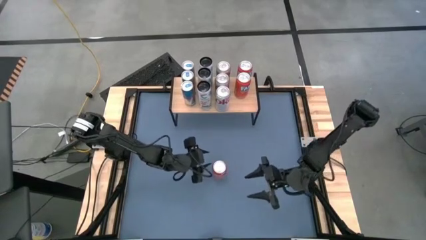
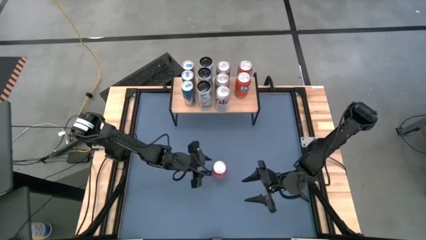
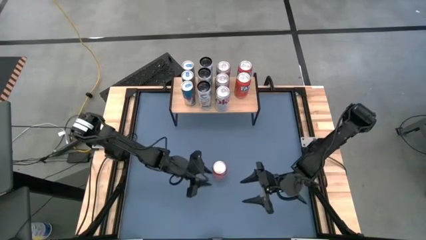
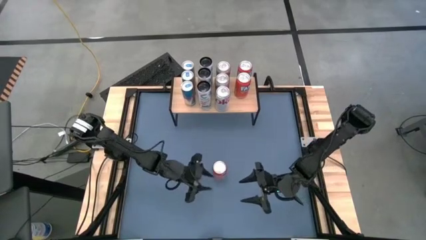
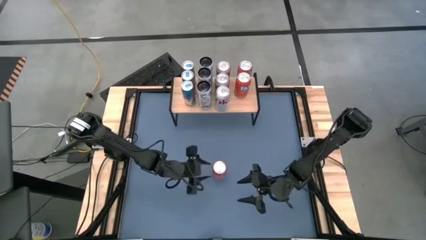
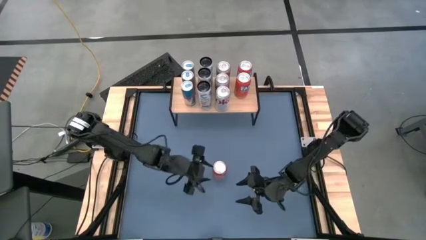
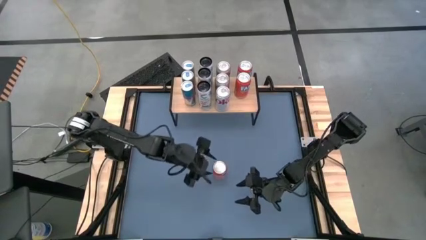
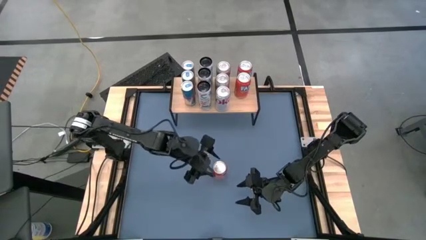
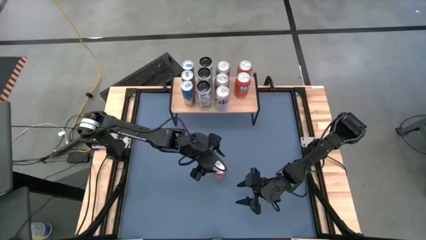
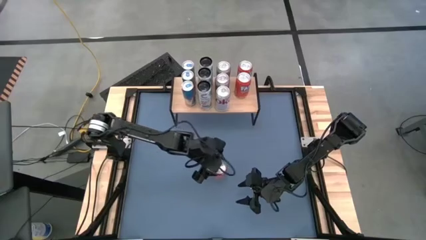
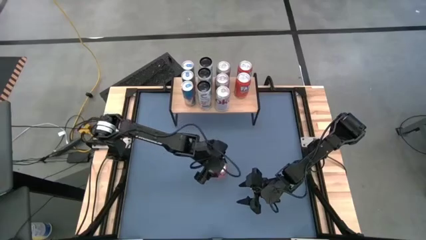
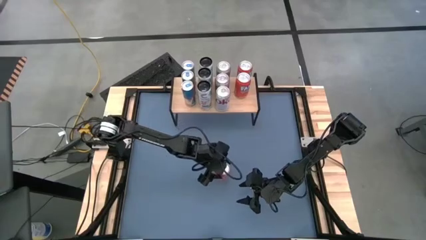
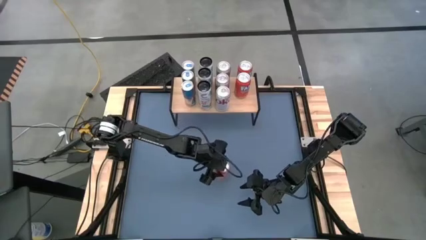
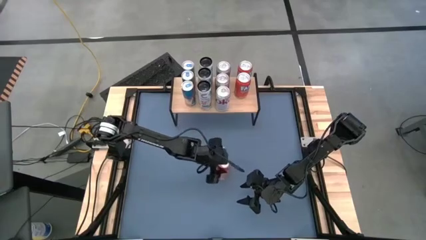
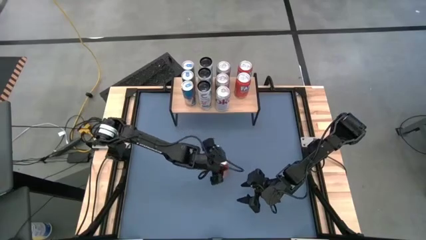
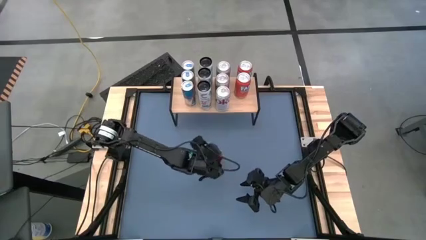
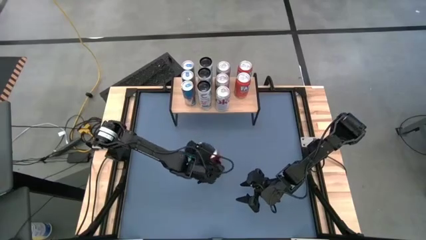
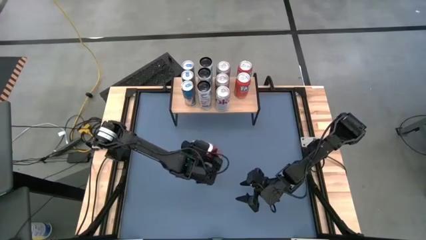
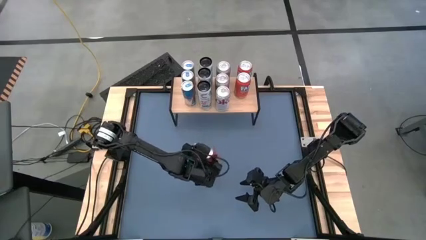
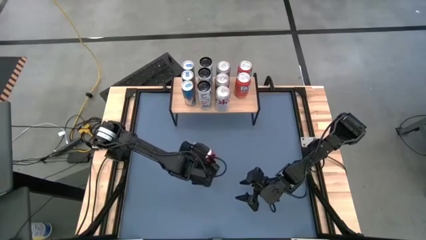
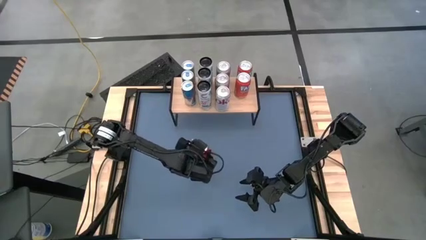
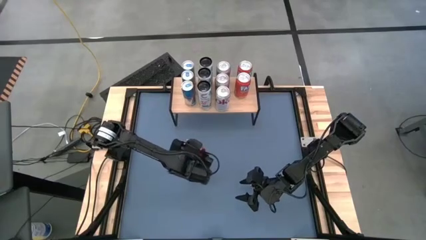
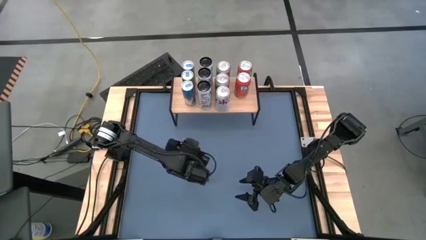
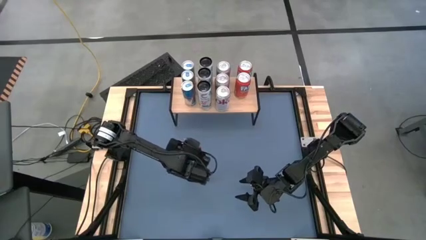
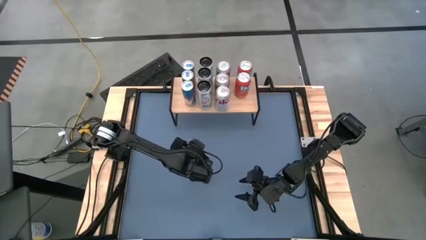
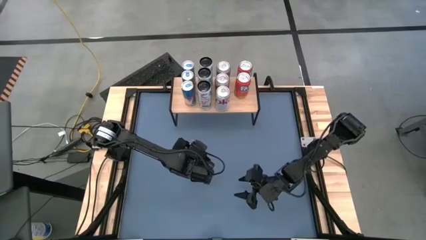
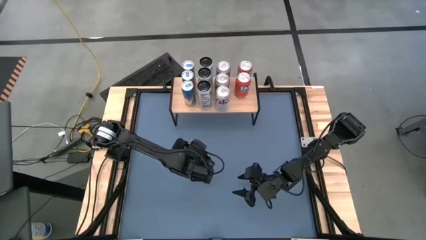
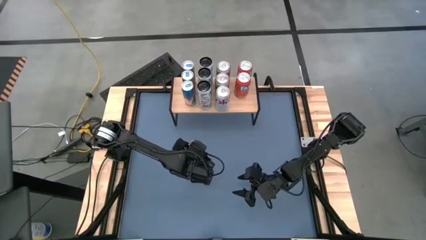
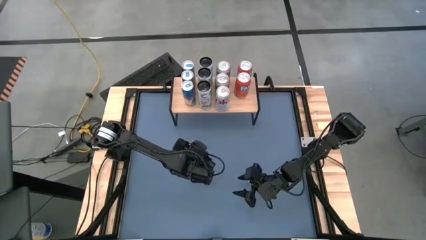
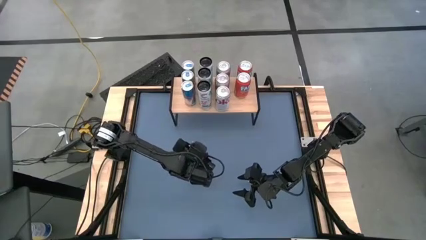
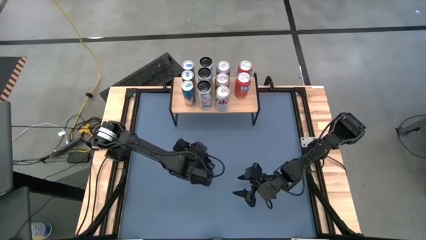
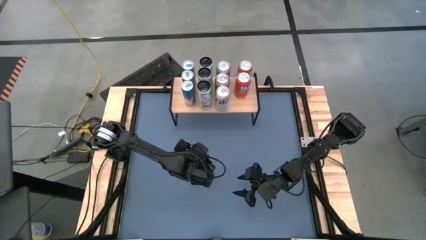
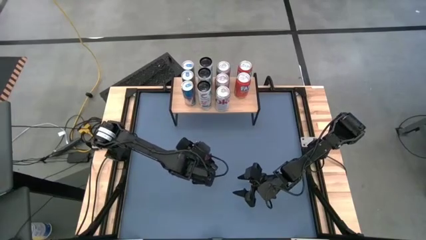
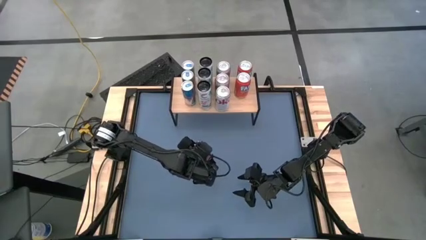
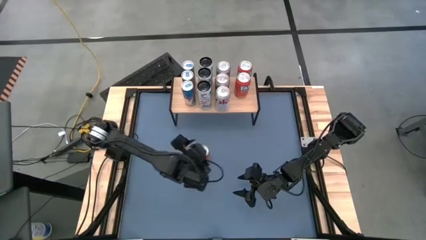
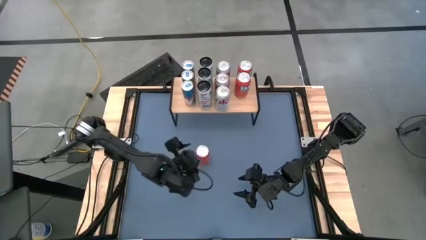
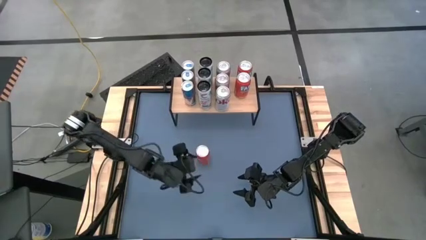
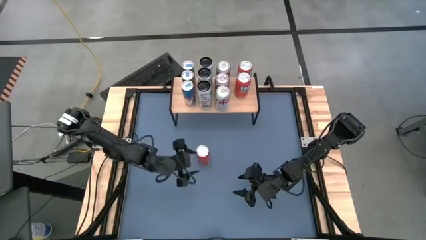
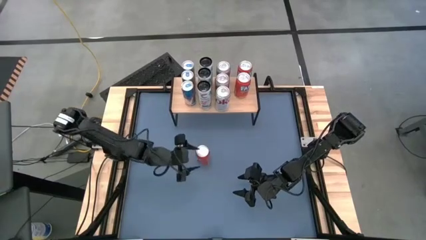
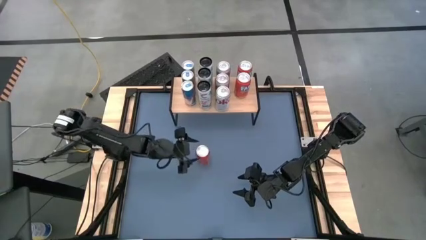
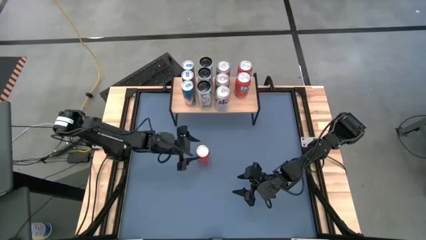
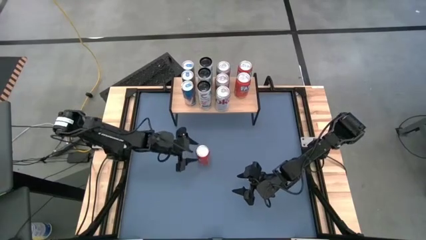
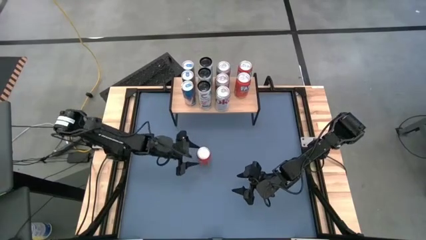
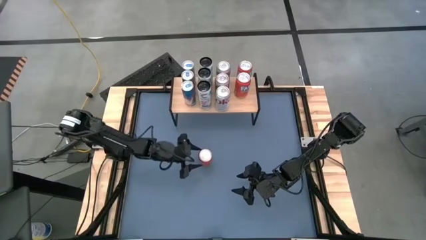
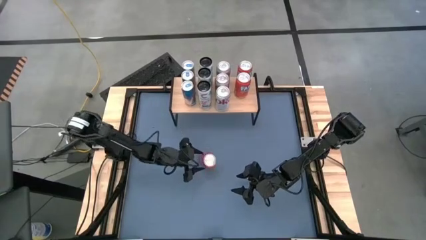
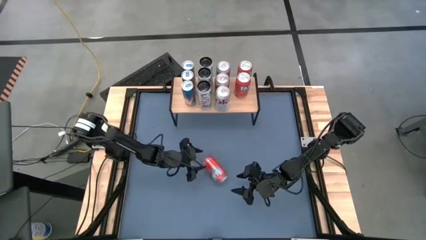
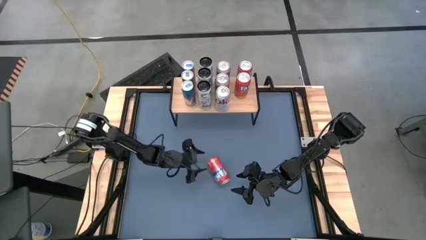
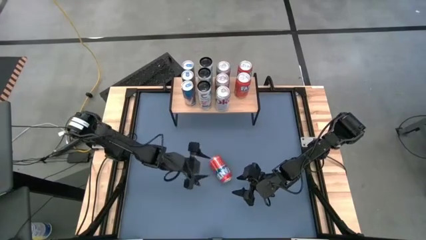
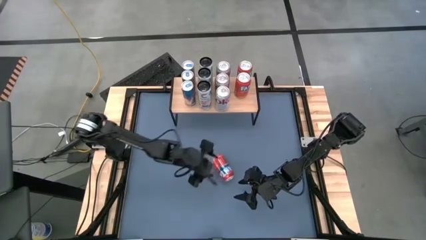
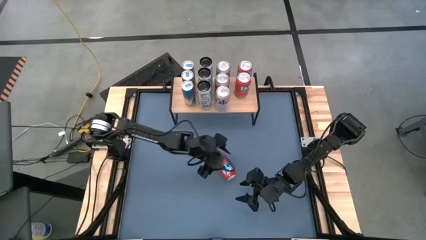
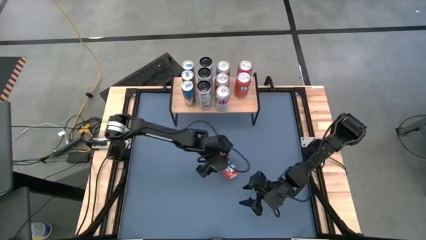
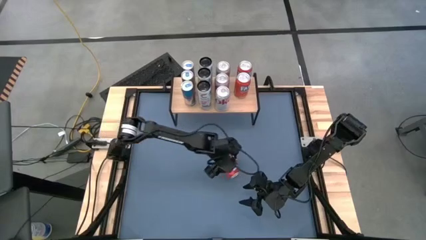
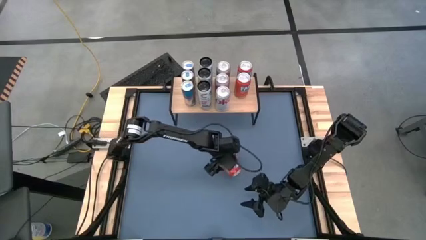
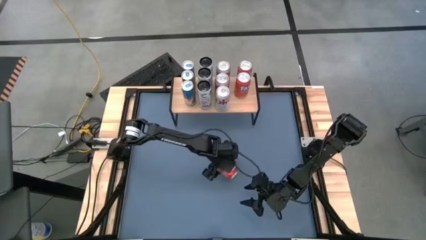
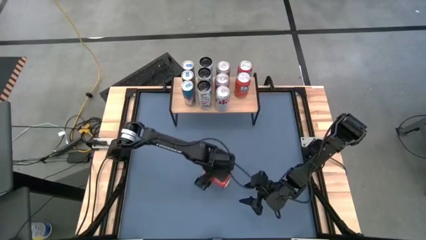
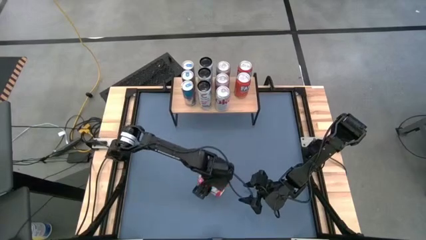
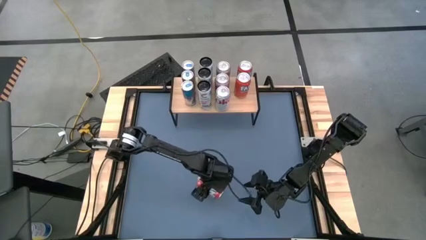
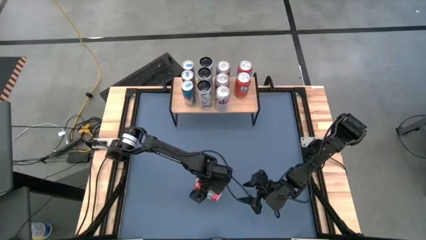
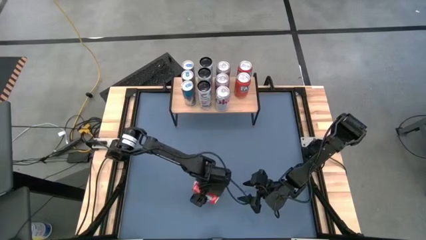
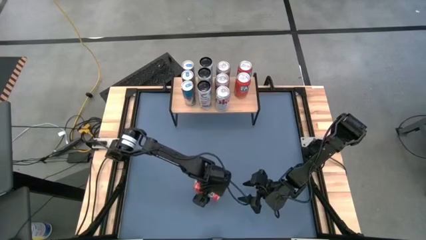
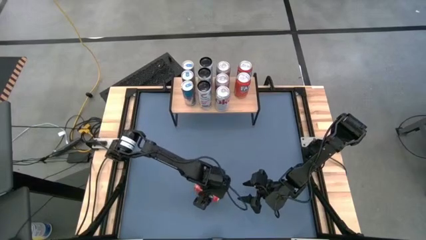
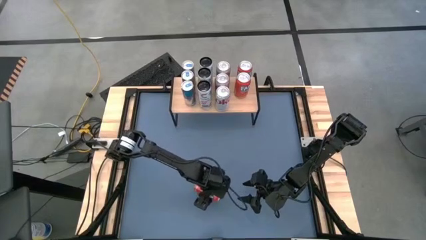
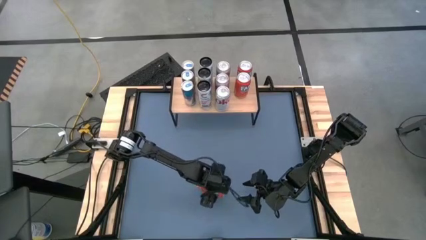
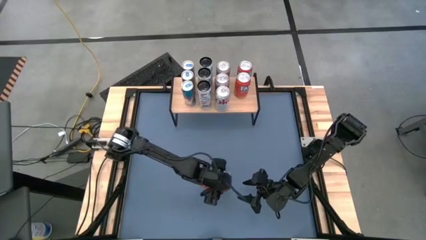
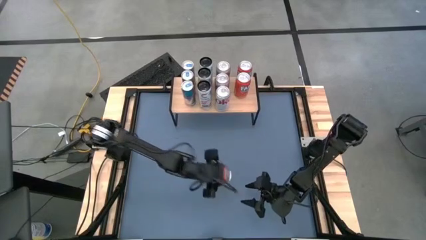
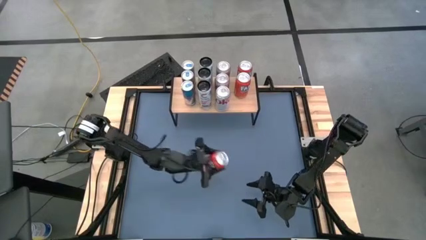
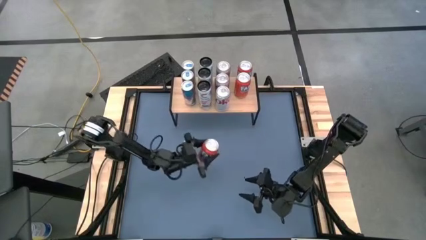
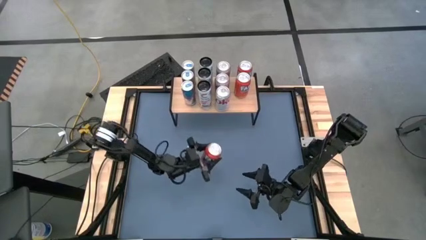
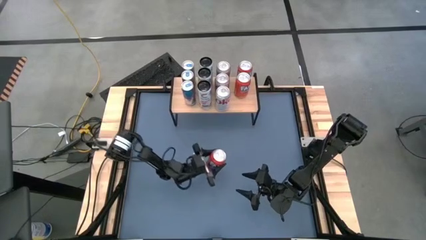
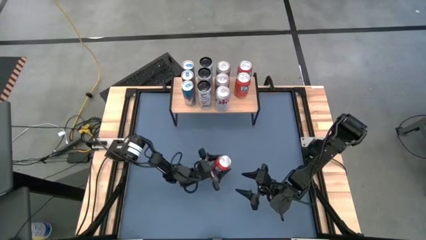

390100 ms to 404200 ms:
Task: Place canned beverage on shelf
Put the orange soda can on the shelf aligned with the other orange soda can
